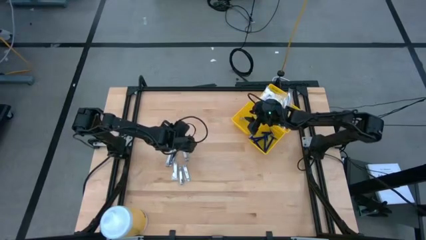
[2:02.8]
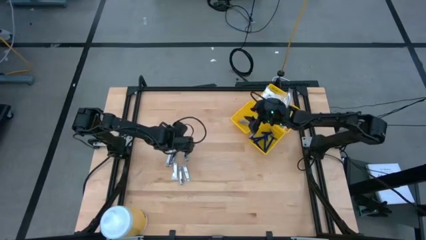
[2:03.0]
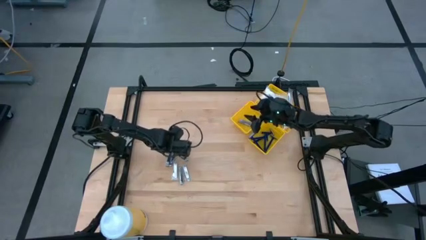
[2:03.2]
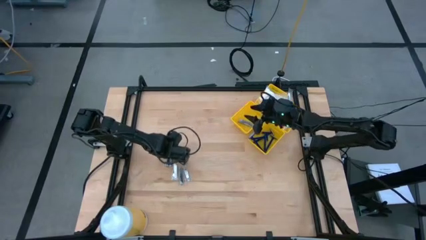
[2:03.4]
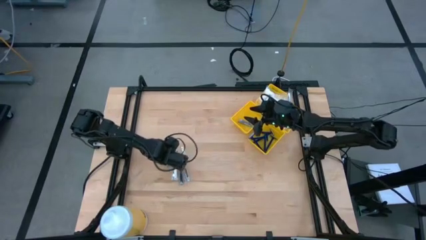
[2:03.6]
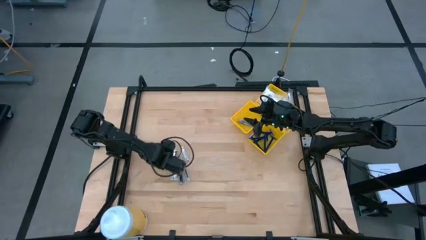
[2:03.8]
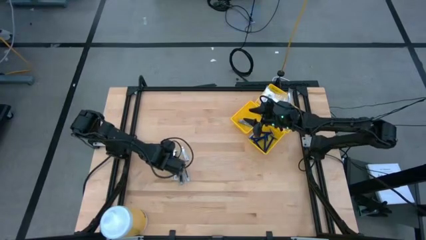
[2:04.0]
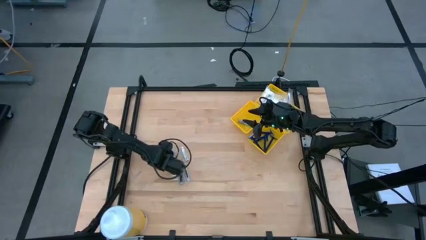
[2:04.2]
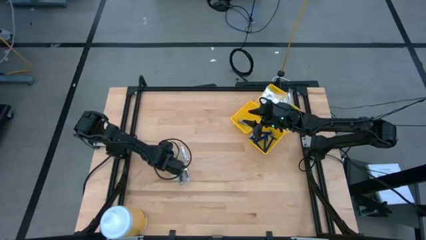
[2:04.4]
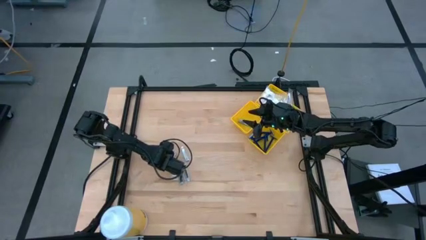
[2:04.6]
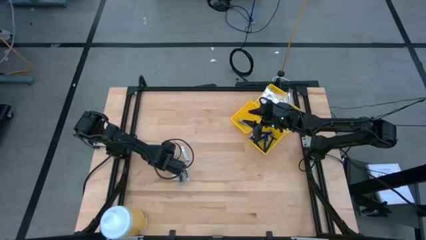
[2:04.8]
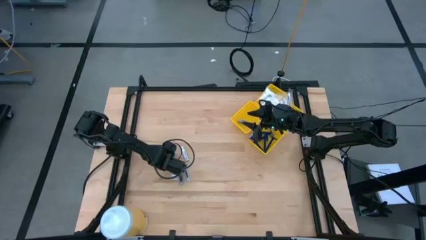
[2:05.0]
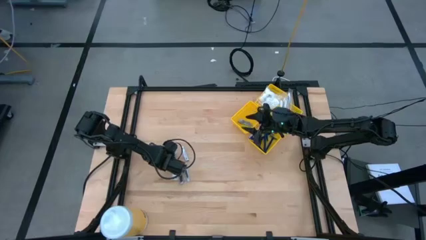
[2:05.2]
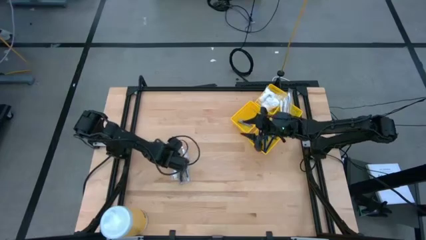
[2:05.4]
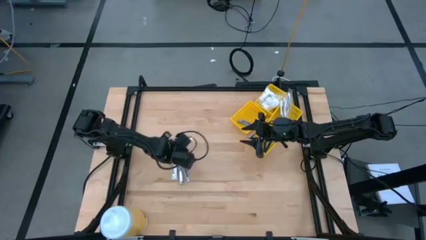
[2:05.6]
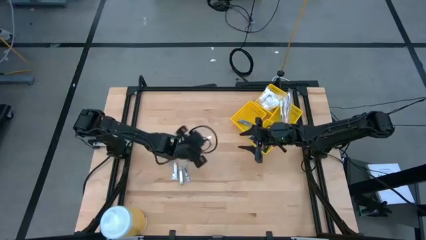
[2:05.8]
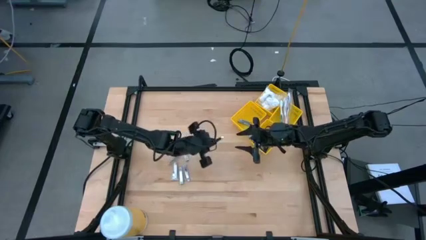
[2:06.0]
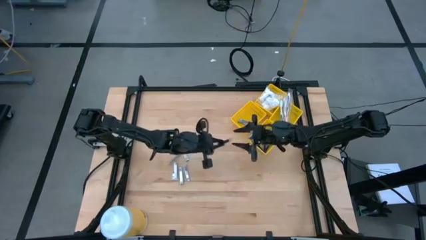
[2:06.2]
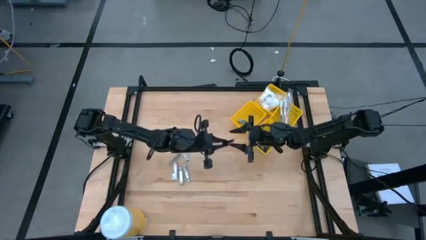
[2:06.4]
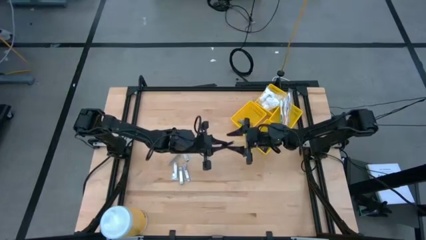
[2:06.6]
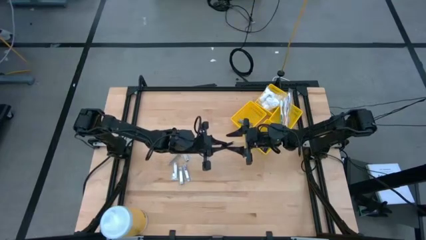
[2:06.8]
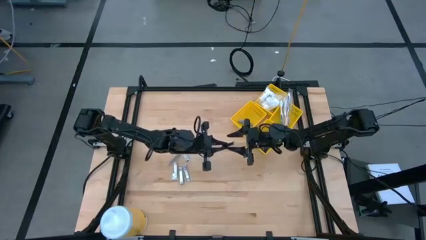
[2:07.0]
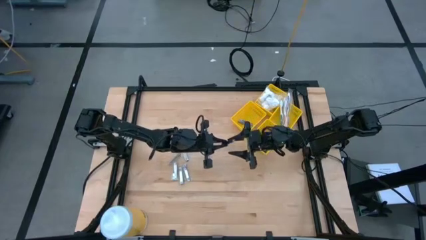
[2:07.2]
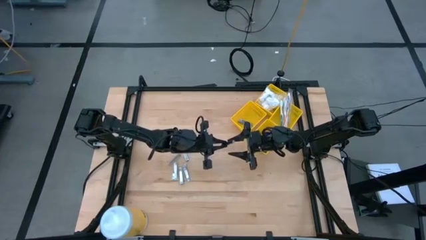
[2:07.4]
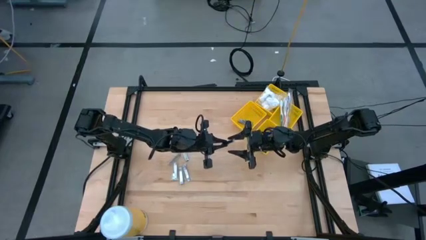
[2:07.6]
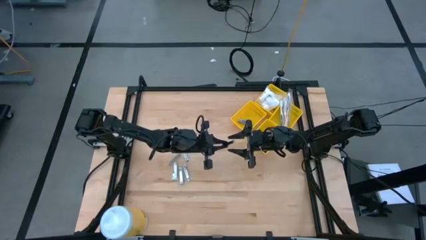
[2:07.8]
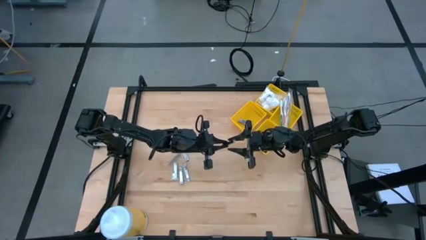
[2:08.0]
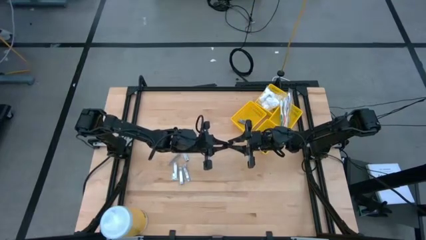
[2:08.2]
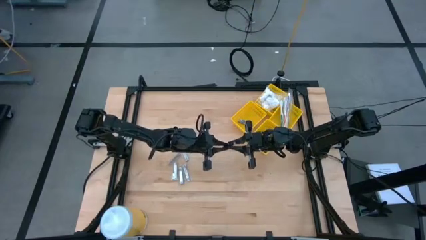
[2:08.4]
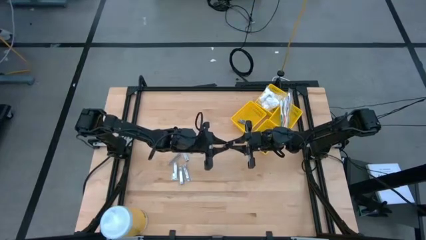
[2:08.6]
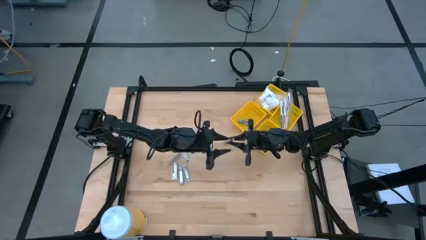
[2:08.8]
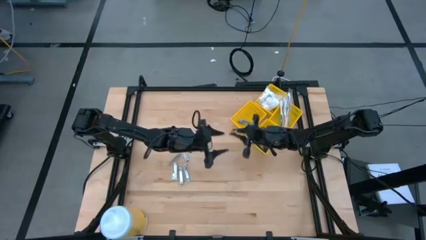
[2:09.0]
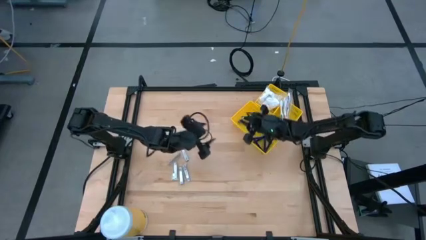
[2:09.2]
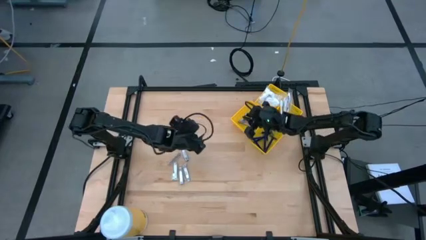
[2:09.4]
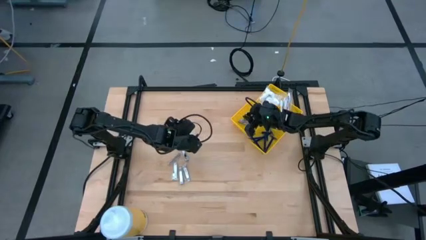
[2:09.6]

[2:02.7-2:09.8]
Task: Pick & Place Travel size toiletries
Put the nail cutter into the bottom left yellow bin

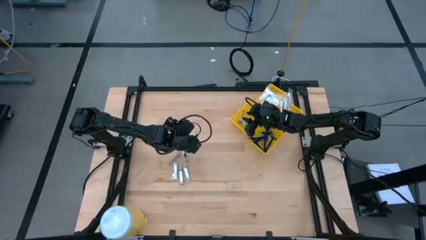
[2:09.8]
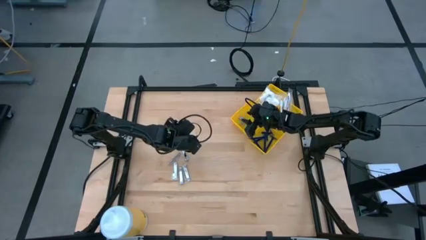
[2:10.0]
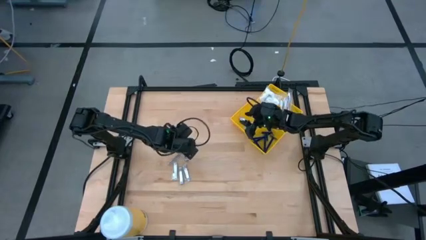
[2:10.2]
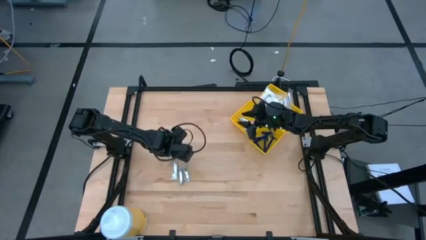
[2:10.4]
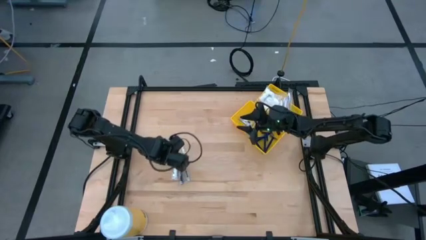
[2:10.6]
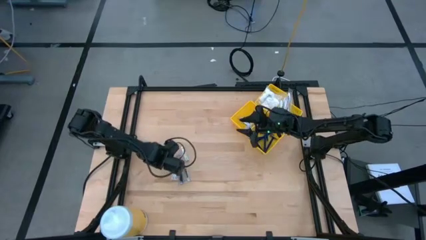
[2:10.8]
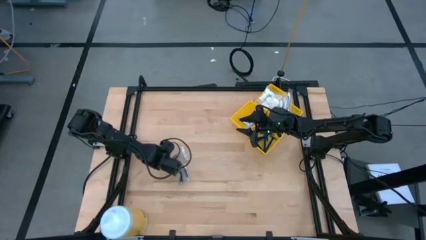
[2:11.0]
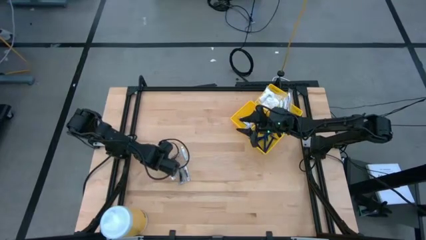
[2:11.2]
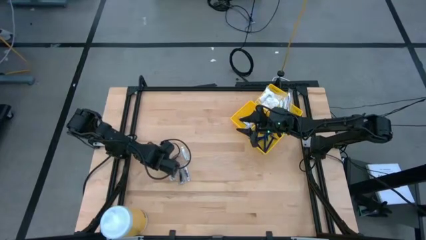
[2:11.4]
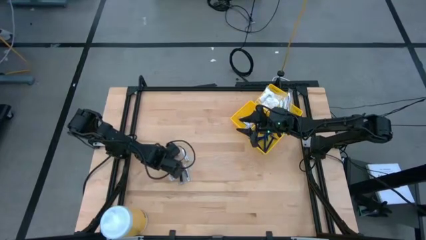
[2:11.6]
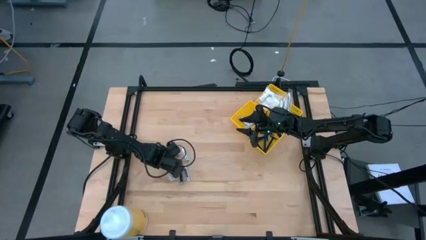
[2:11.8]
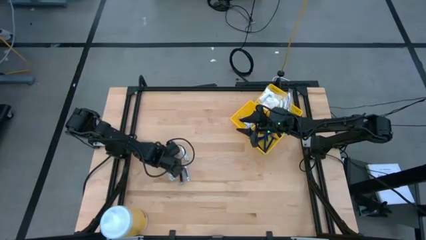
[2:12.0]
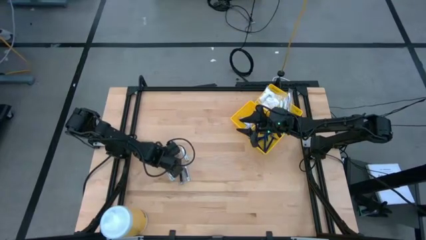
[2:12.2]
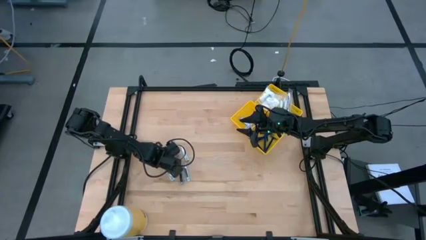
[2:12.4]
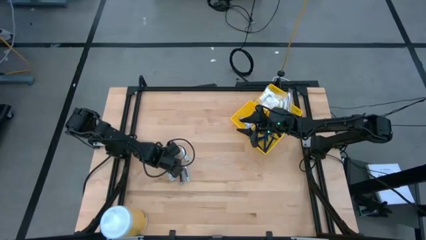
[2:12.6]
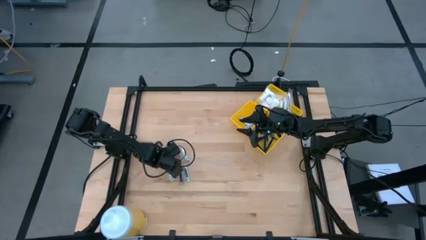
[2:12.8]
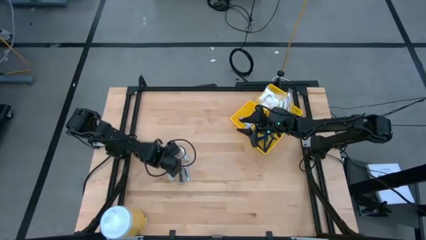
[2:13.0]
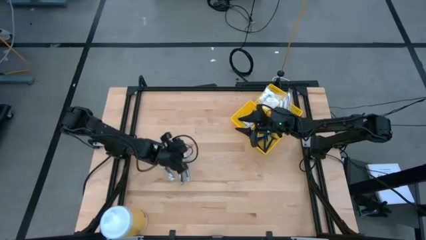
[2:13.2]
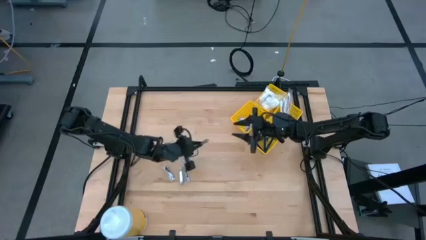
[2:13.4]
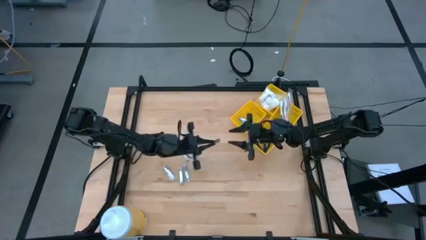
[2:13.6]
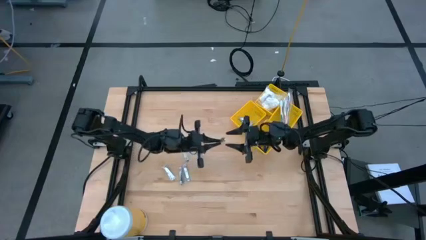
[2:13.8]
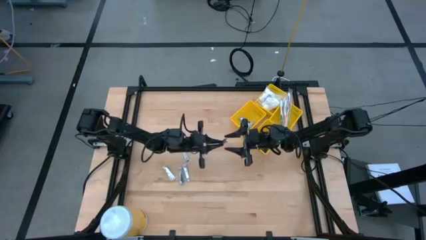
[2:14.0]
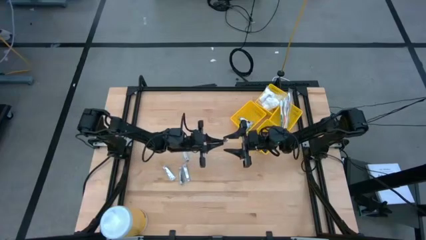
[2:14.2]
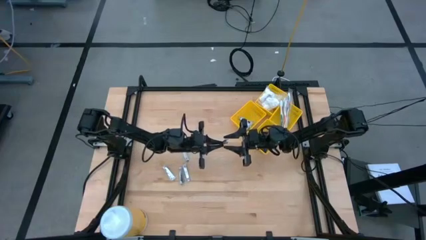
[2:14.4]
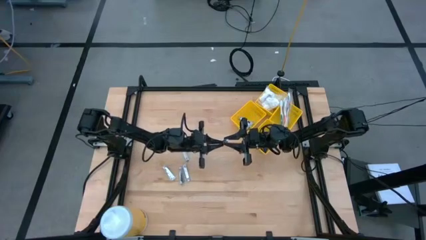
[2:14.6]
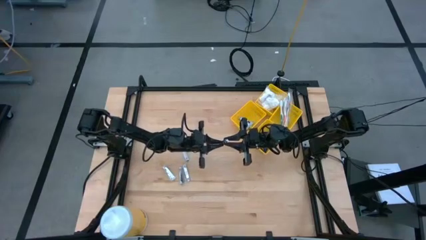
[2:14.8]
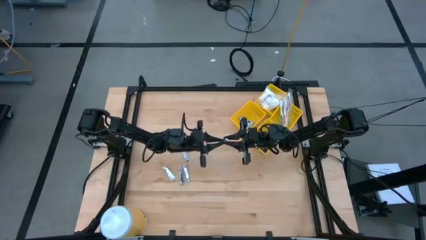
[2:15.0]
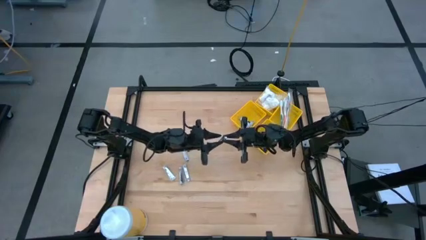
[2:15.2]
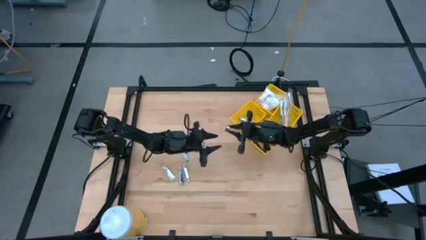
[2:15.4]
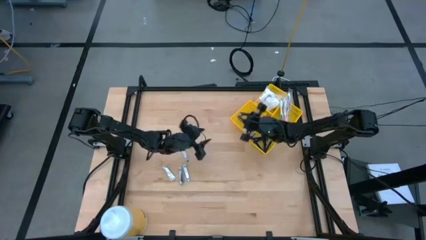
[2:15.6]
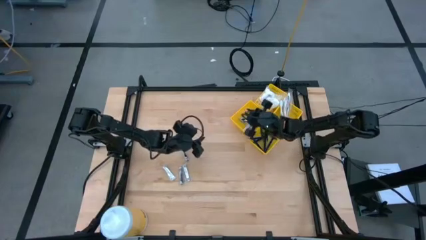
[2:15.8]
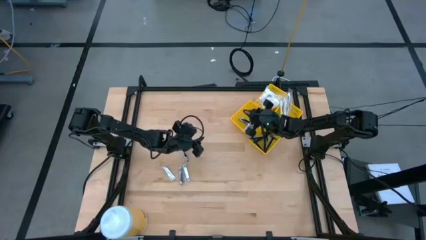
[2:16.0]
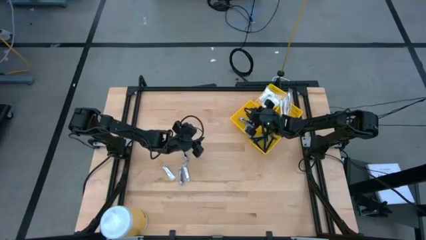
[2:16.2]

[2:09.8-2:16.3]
Put the nail cutter into the bottom left yellow bin

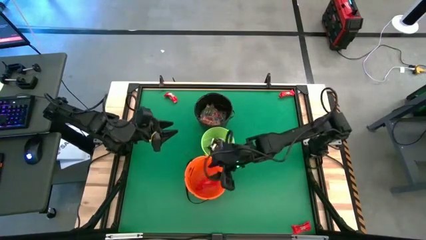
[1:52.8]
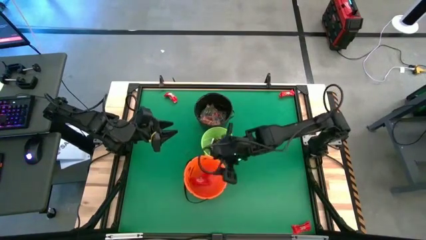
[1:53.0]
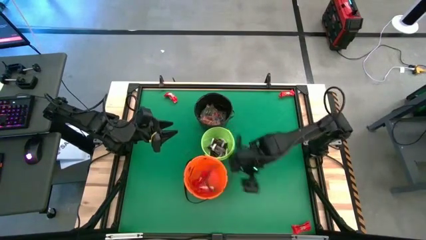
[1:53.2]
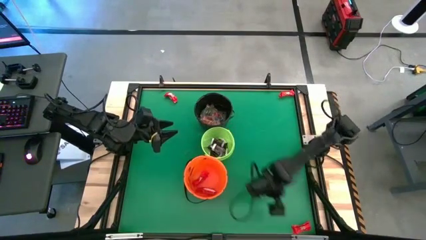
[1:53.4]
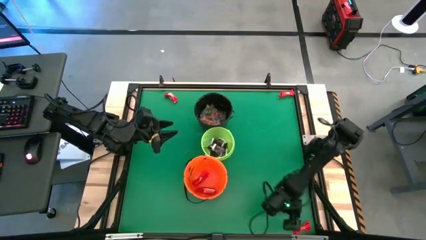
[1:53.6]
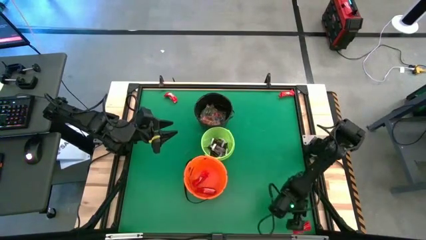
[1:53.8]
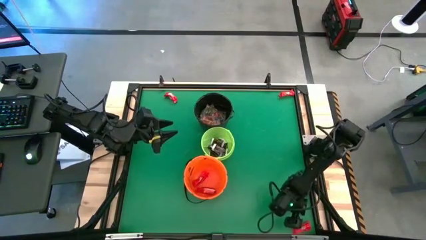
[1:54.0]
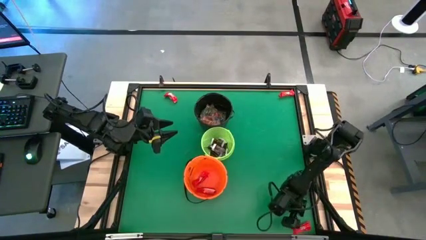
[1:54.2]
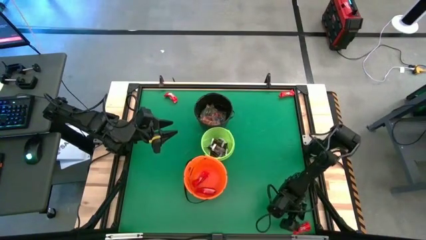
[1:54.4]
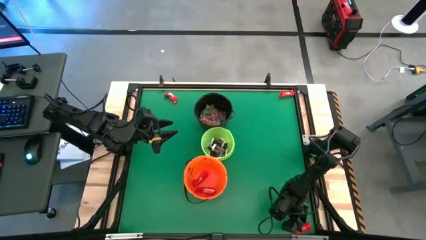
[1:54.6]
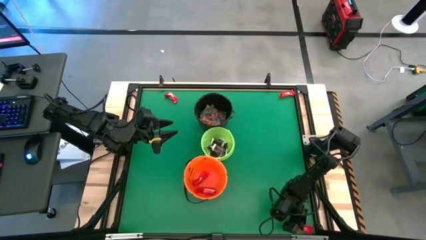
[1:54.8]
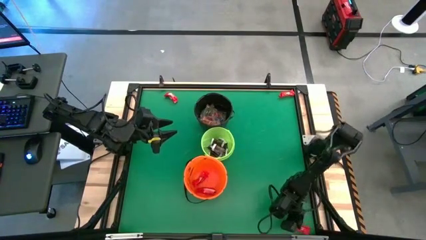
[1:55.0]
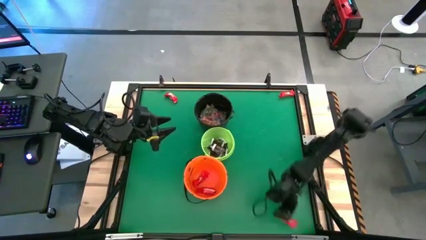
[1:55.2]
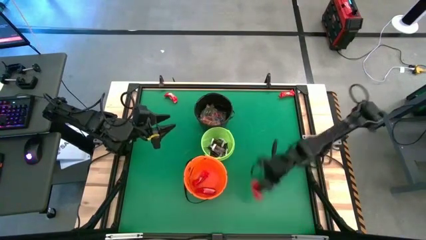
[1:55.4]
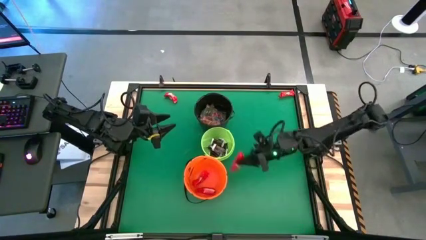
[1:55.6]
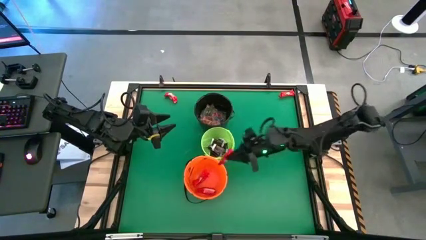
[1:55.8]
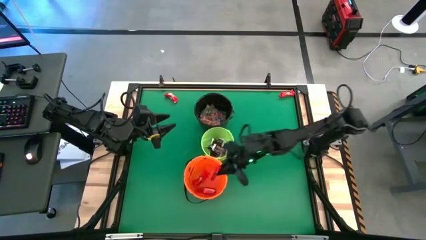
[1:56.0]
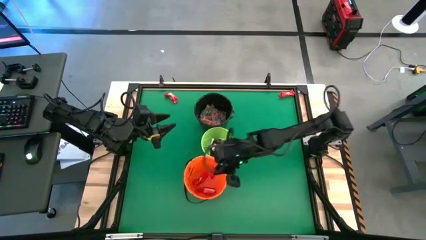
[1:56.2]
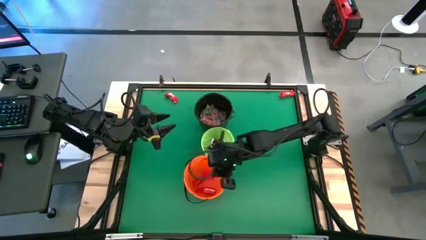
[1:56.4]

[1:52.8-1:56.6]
Task: Sort candy by brand, put in halloween buckets
Put the red chocolate bar into the orange bucket
